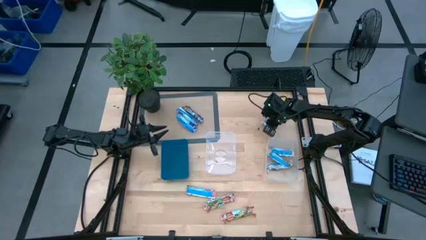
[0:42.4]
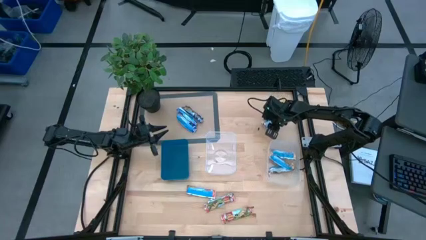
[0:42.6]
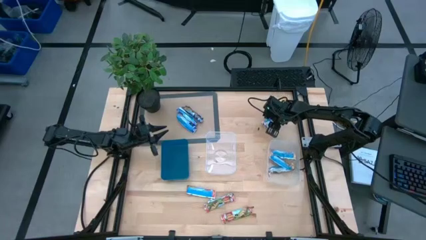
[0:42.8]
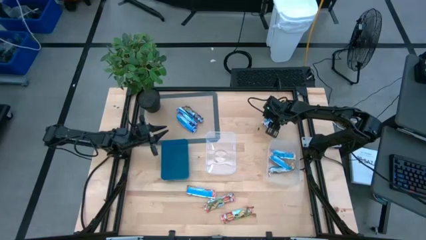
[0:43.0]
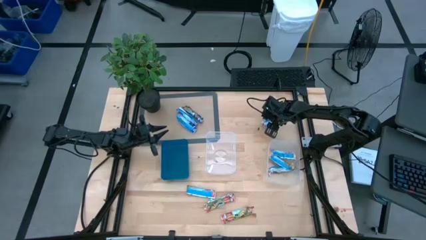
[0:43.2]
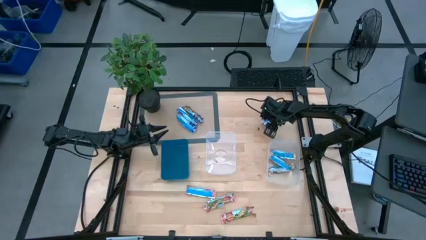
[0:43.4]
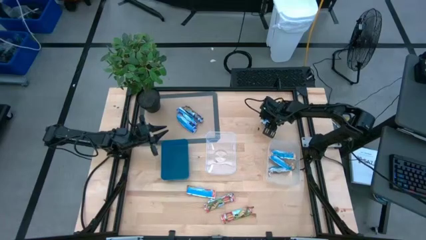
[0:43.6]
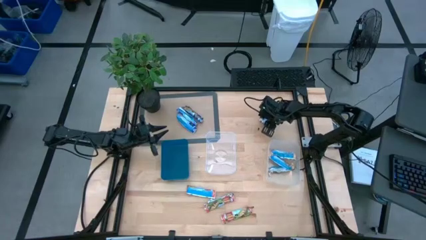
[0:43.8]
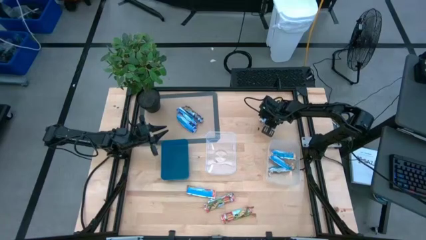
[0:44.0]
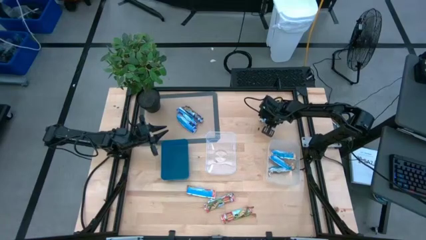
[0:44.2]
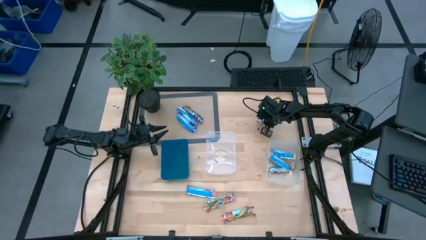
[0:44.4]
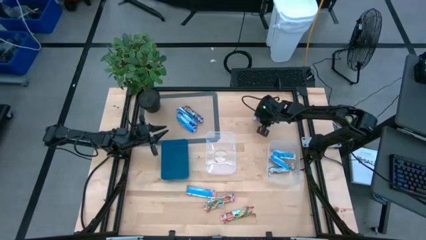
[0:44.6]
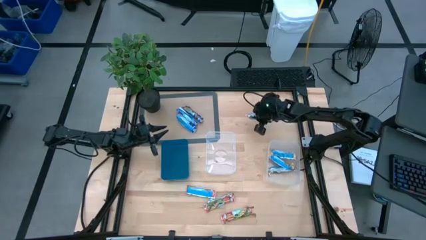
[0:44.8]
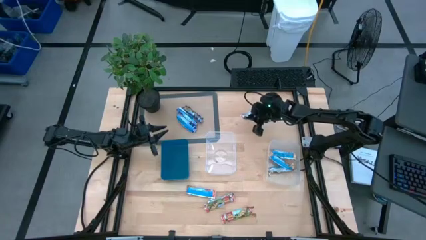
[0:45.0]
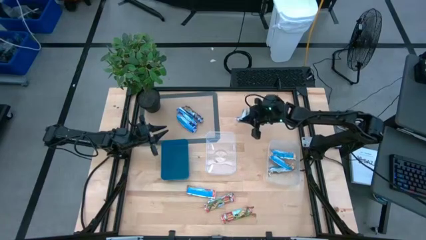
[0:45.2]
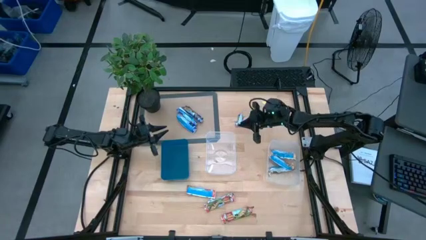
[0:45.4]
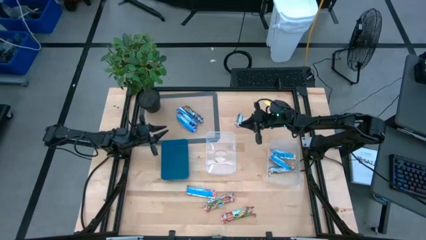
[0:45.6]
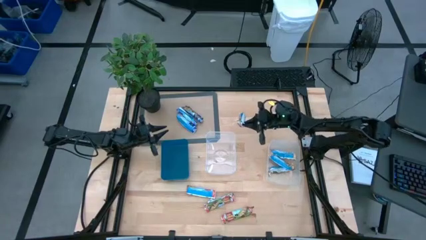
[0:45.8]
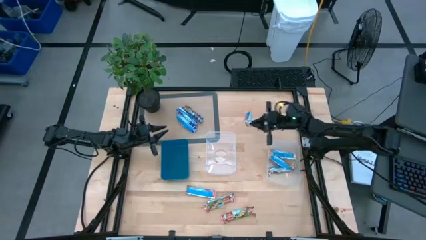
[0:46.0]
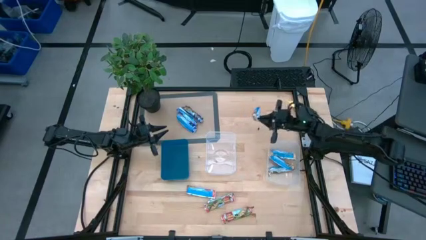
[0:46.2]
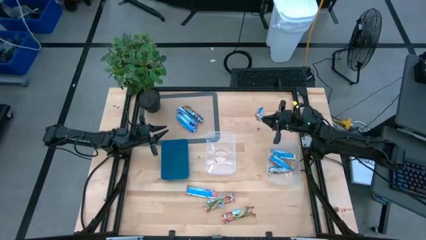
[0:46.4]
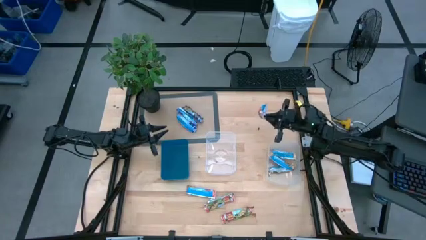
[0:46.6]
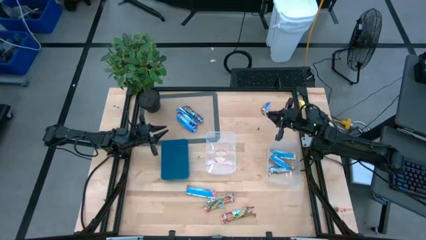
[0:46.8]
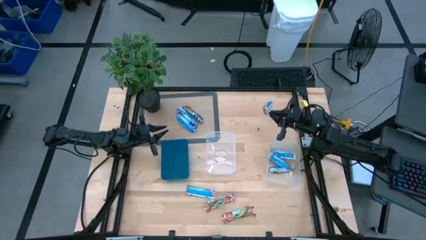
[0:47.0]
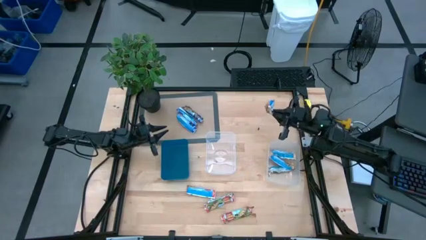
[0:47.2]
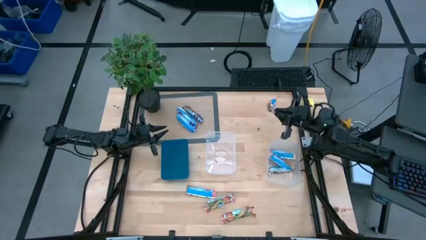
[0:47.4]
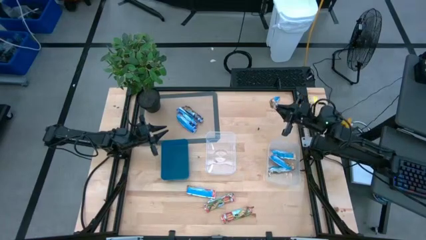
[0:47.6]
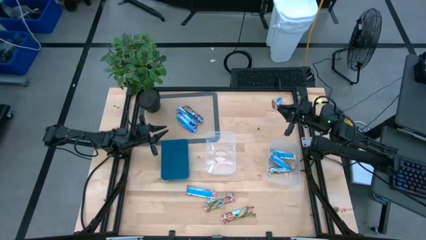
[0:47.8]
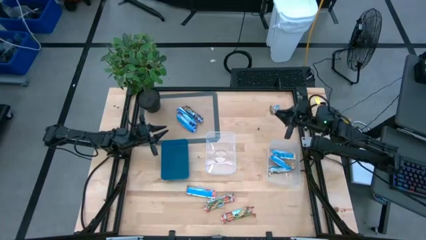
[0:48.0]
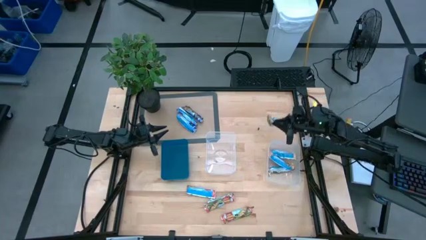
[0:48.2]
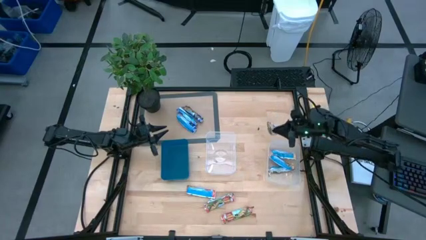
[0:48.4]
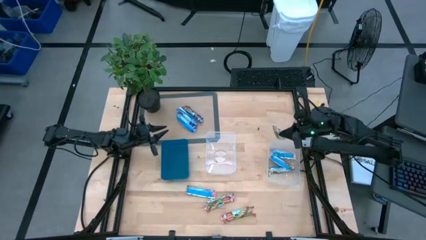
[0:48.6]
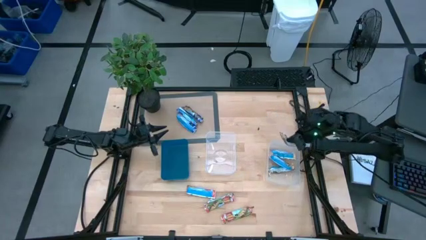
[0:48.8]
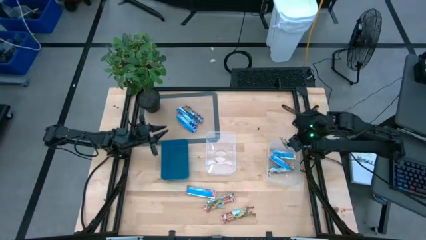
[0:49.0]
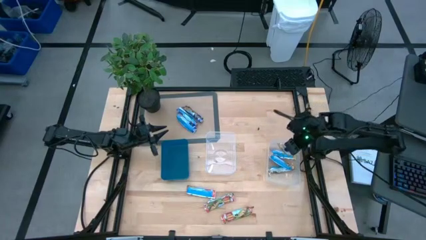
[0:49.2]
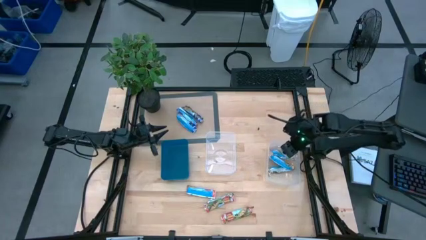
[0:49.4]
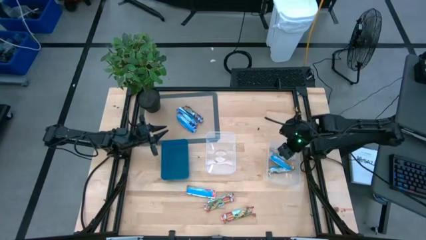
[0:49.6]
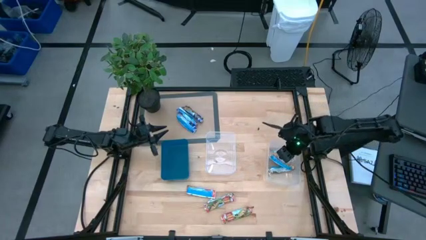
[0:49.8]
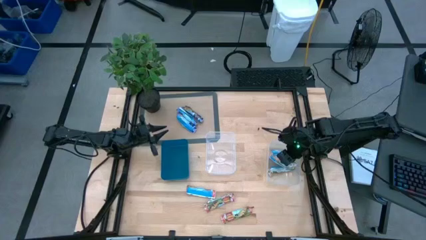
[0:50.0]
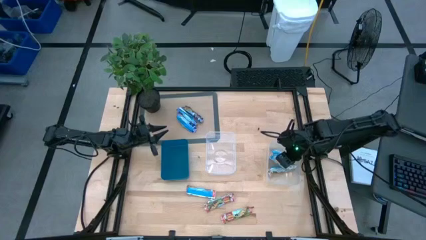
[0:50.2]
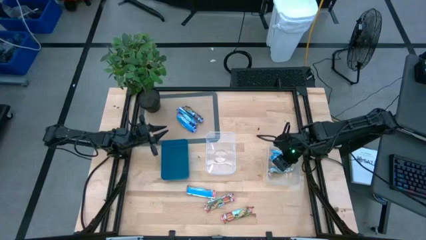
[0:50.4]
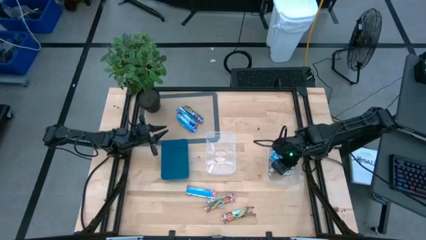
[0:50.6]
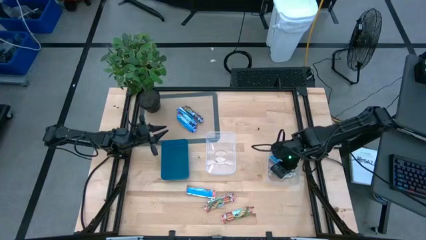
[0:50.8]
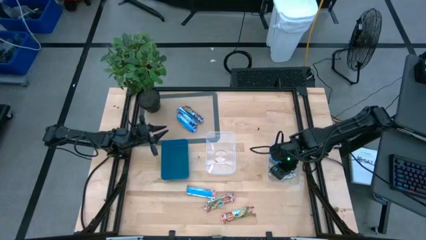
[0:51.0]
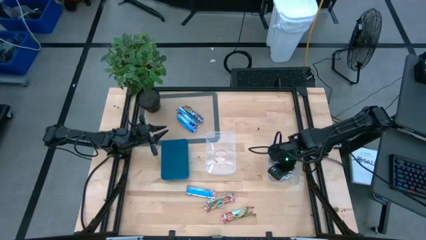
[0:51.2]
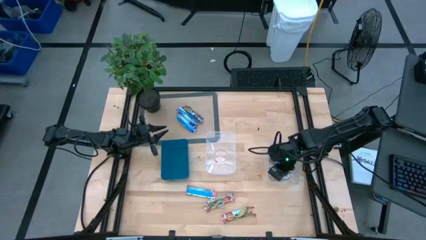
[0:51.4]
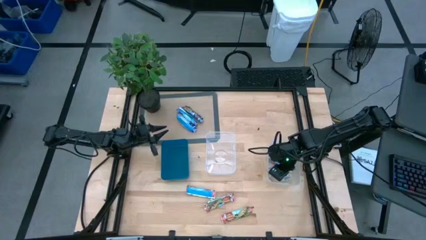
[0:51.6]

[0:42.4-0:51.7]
Task: Pick and place Granola Bars by type
Put the yellow granola bar into the right transparent bin

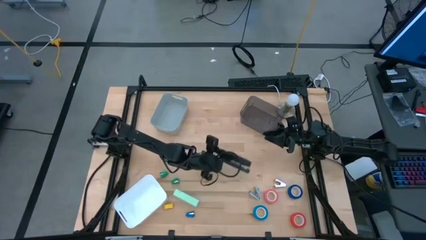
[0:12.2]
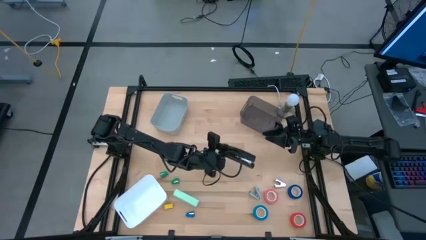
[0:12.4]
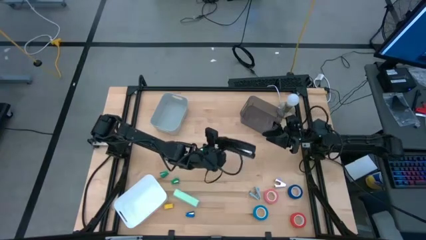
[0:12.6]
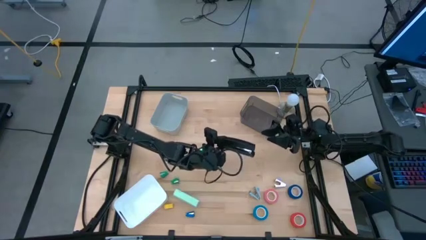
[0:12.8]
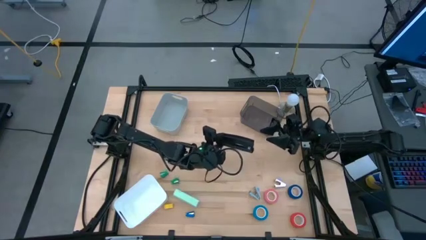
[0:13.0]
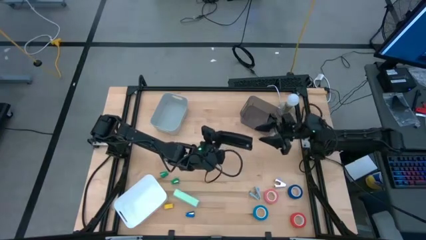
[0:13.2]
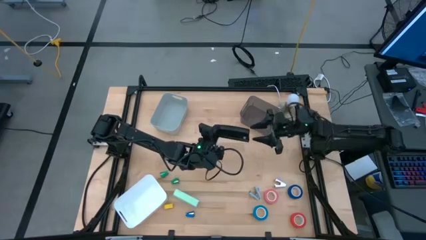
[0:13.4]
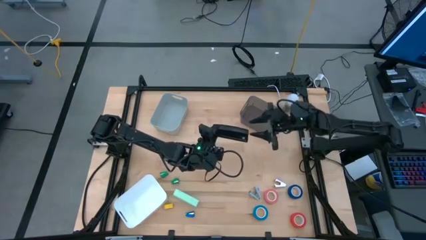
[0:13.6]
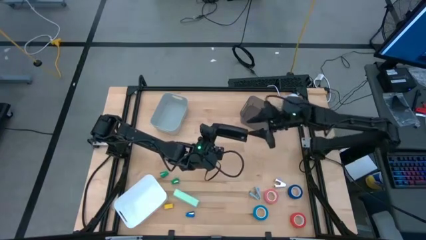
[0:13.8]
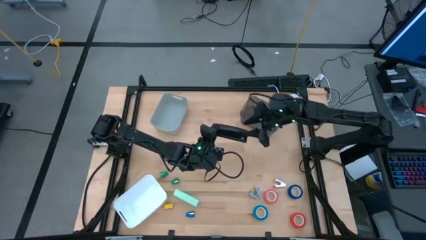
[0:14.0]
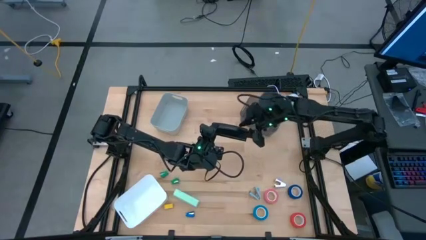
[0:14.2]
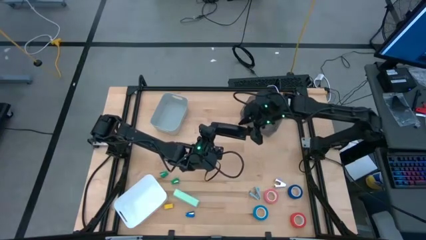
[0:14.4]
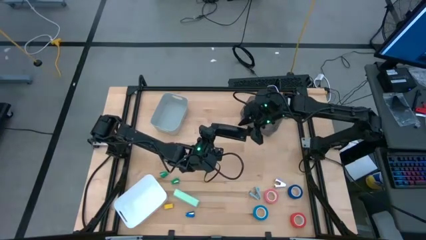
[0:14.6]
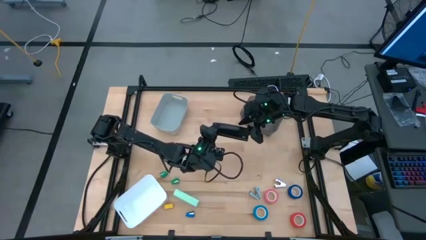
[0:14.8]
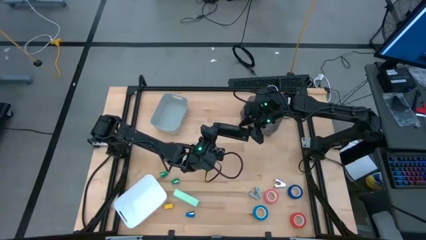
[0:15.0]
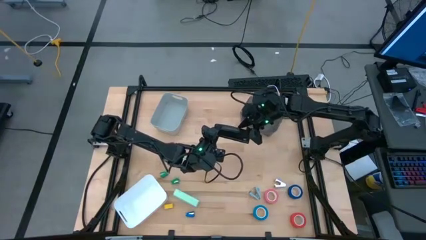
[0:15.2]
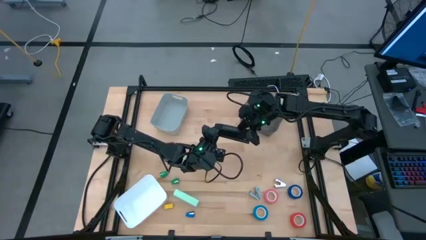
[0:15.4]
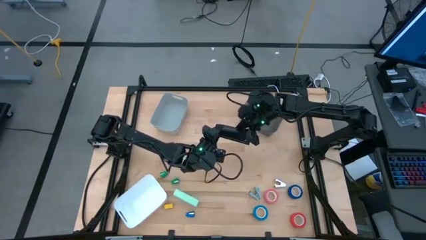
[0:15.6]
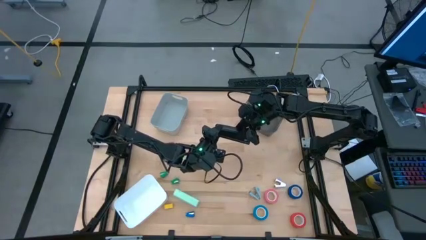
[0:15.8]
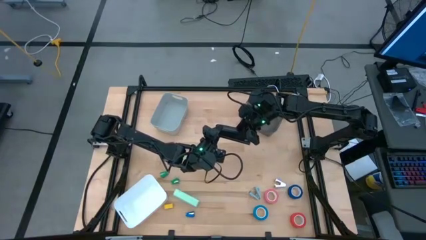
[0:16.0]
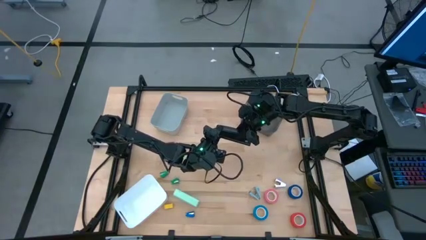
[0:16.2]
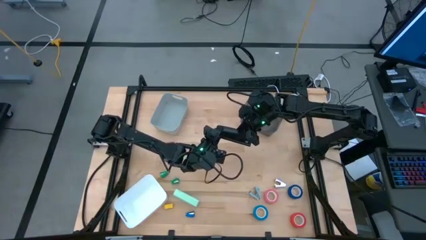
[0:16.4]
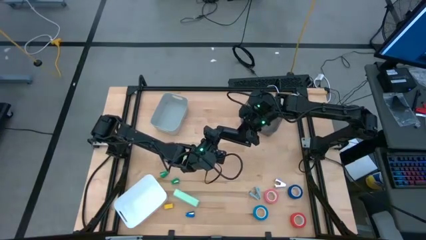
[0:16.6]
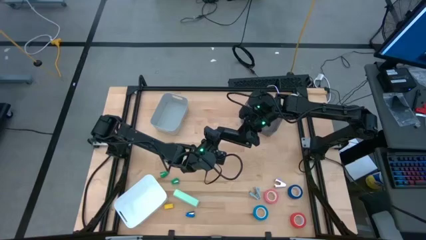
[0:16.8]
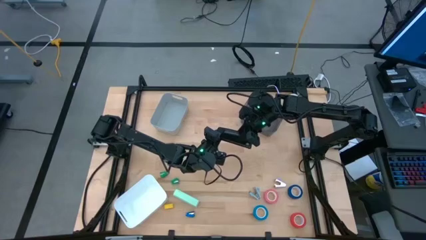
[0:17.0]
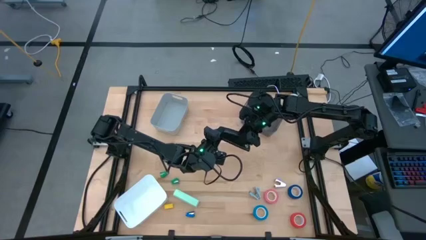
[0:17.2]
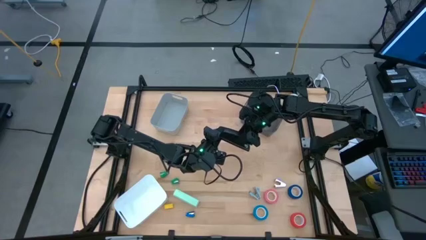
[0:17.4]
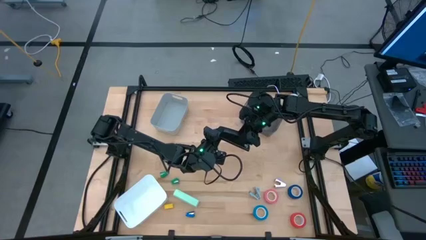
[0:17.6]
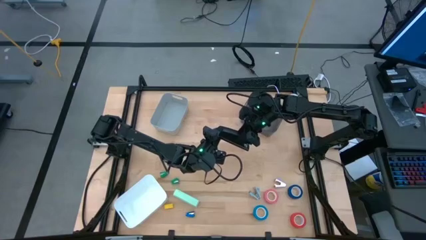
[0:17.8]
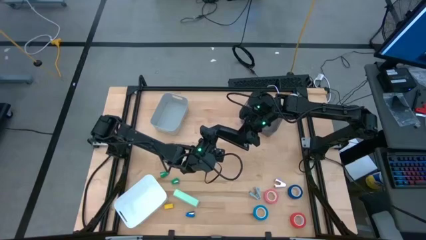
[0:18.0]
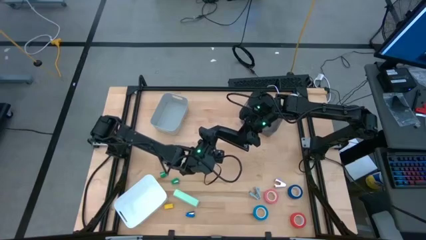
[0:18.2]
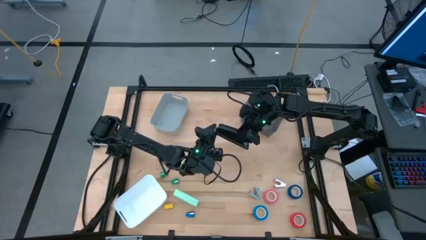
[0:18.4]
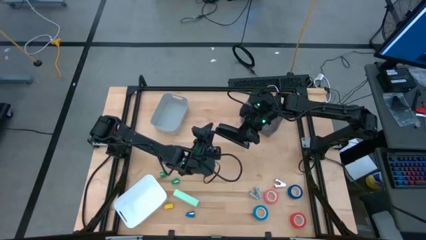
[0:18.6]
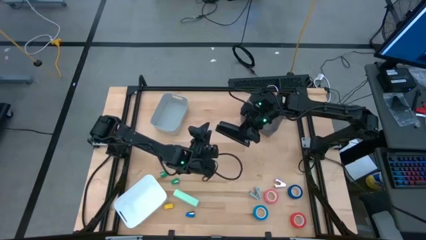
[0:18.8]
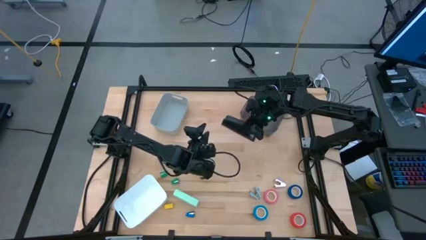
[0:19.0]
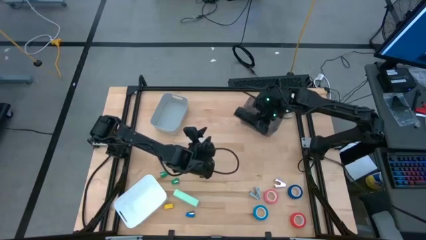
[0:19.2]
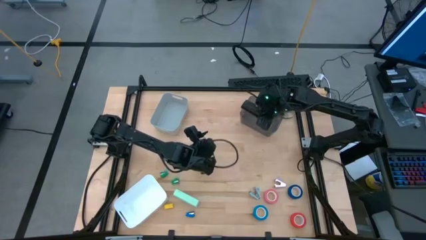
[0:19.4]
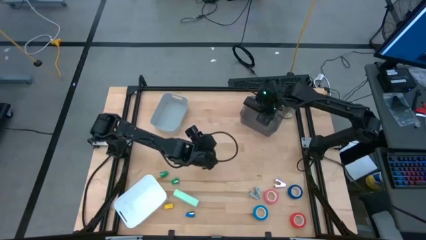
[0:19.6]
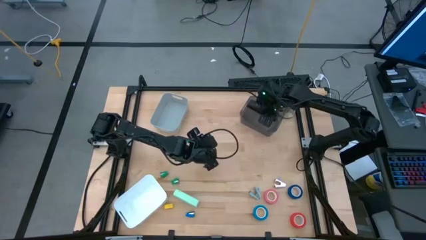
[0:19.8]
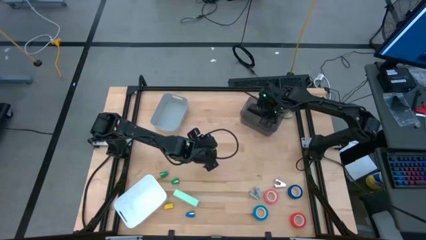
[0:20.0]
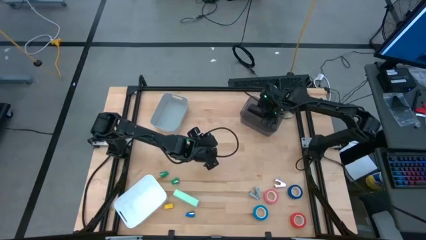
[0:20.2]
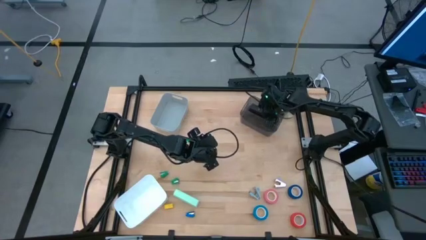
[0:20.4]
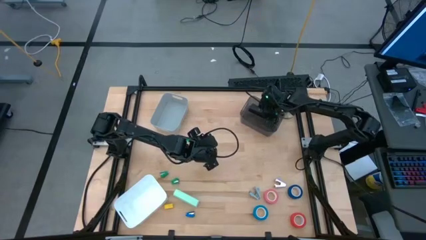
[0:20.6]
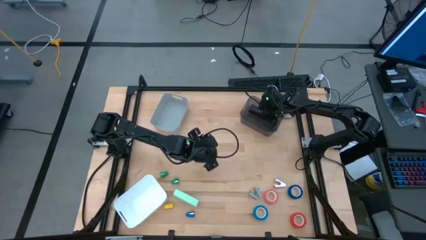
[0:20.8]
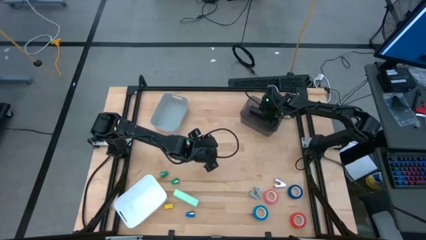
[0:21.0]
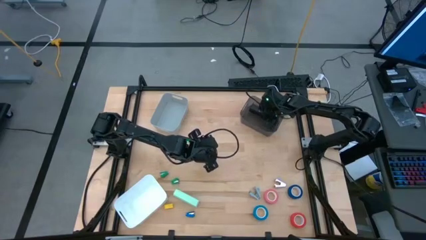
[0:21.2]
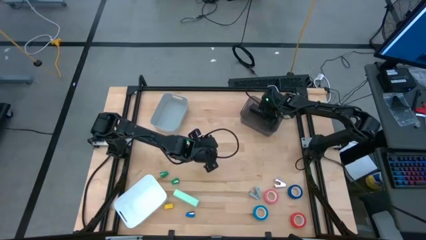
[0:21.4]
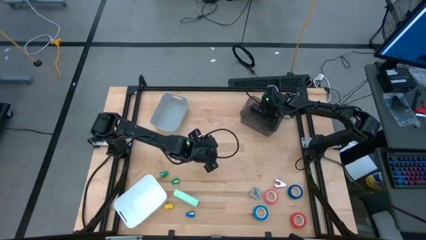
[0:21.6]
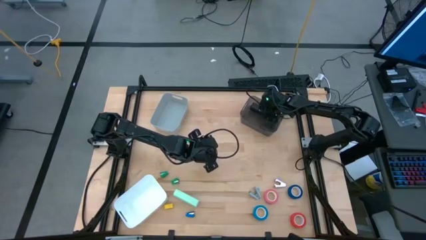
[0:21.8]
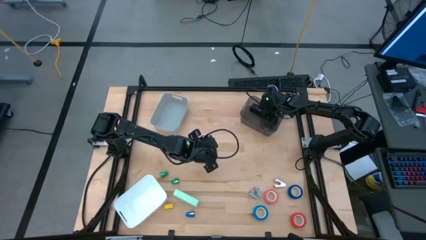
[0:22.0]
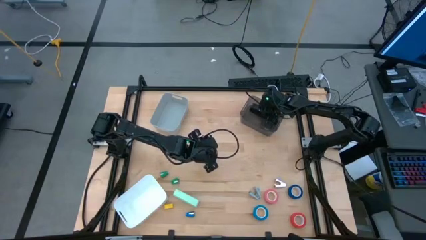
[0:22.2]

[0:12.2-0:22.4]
Task: Pick and place Stapler, Stapler remover, tape
Put the black stapler into the black bin
